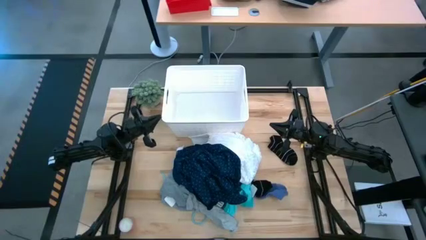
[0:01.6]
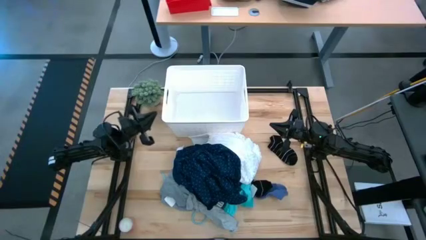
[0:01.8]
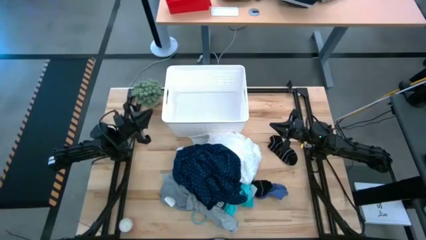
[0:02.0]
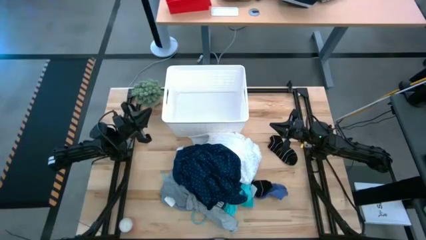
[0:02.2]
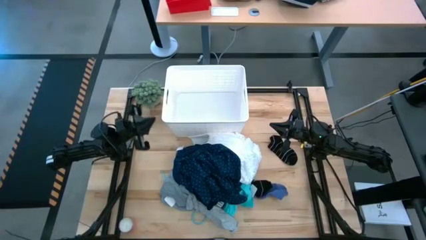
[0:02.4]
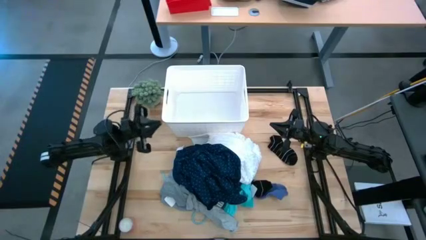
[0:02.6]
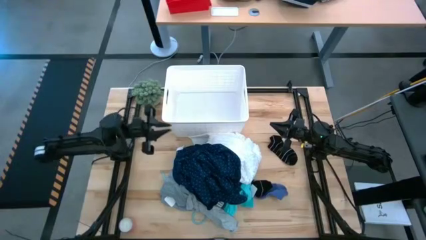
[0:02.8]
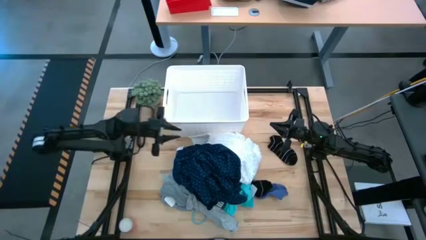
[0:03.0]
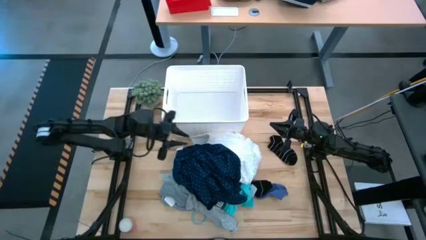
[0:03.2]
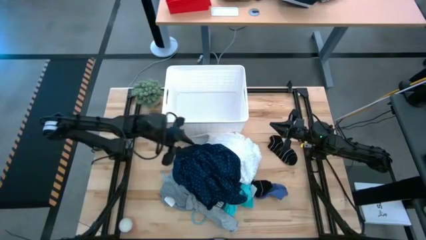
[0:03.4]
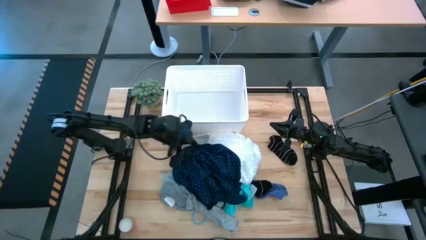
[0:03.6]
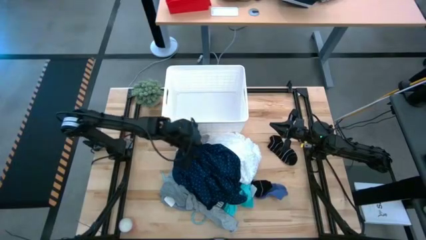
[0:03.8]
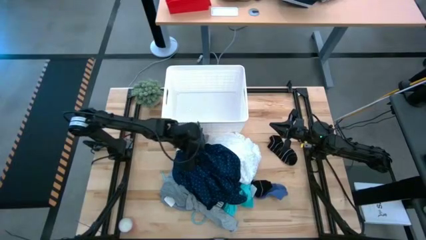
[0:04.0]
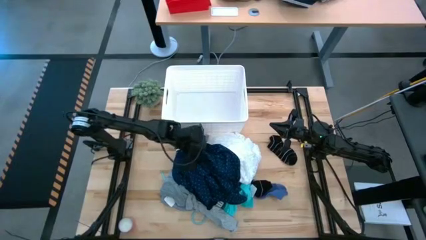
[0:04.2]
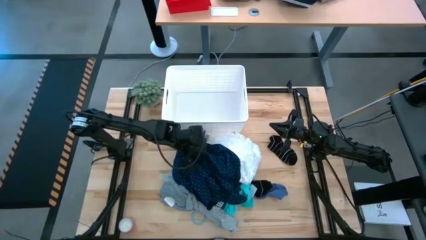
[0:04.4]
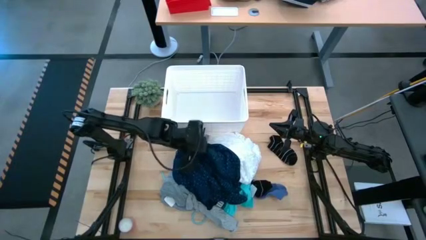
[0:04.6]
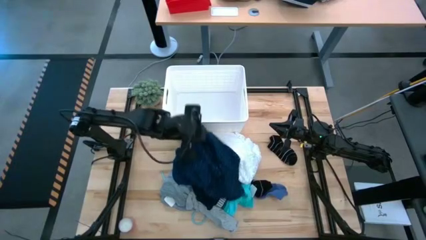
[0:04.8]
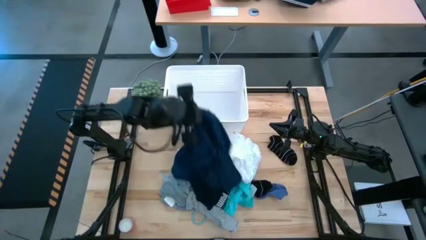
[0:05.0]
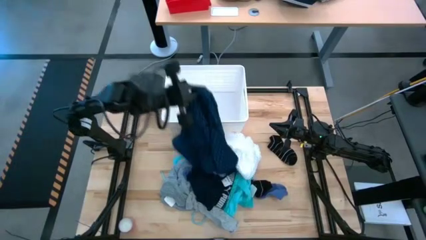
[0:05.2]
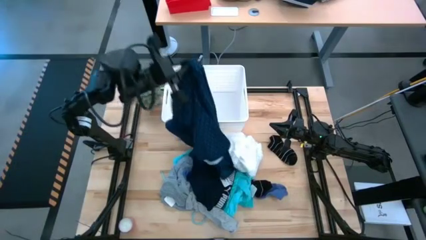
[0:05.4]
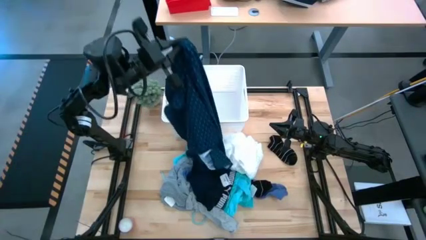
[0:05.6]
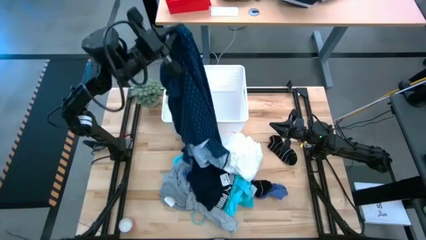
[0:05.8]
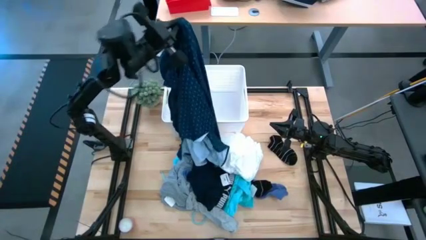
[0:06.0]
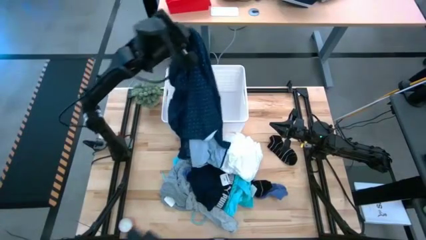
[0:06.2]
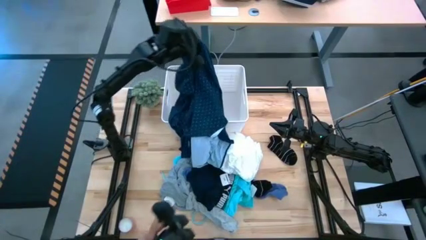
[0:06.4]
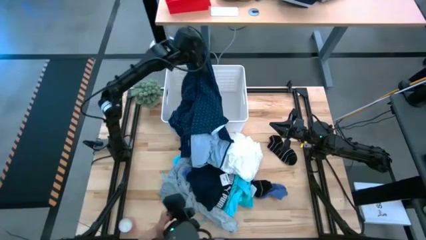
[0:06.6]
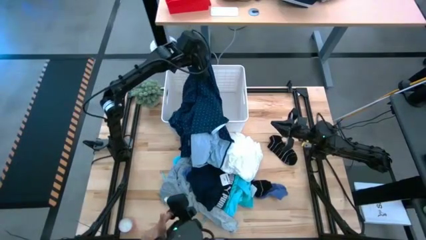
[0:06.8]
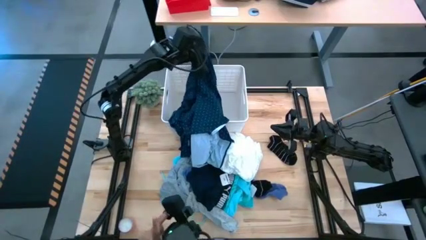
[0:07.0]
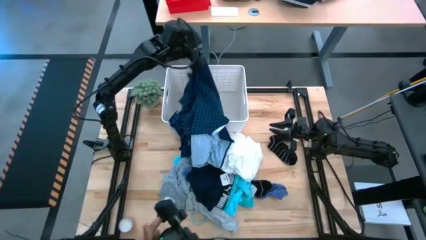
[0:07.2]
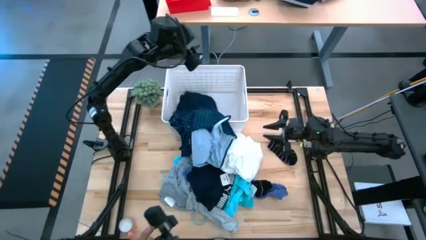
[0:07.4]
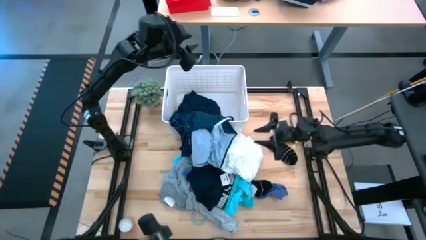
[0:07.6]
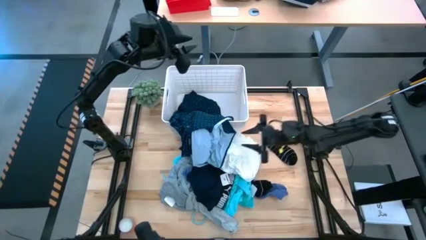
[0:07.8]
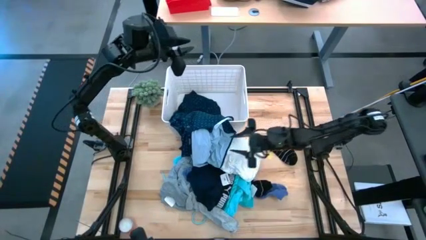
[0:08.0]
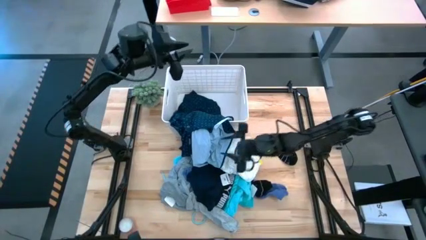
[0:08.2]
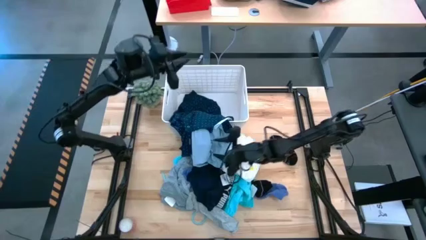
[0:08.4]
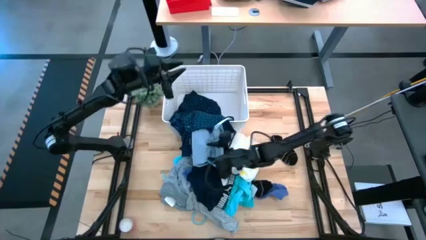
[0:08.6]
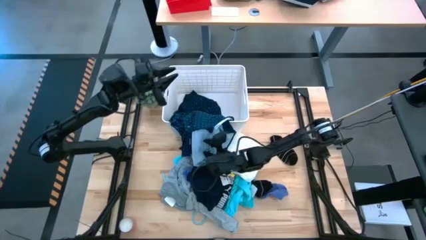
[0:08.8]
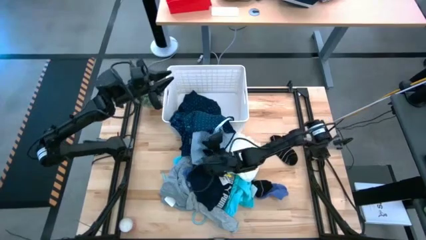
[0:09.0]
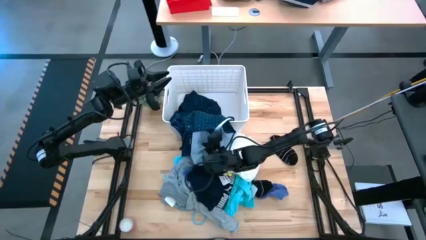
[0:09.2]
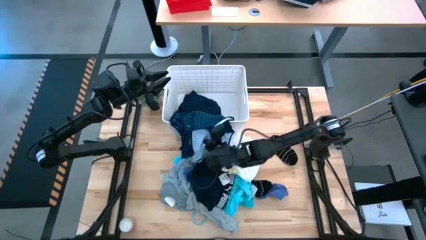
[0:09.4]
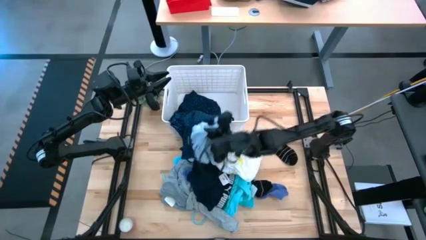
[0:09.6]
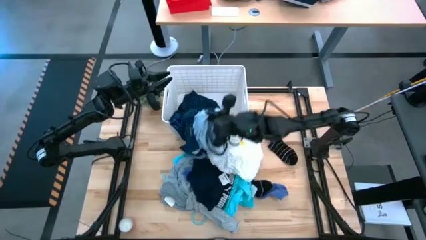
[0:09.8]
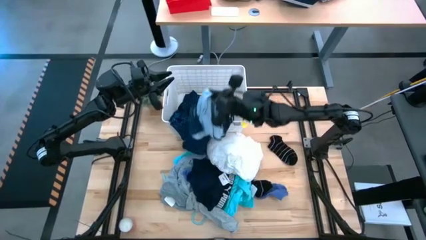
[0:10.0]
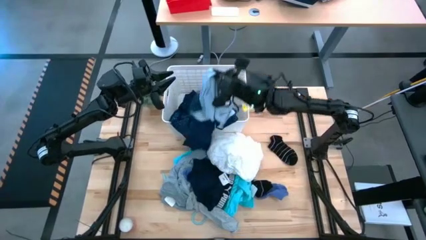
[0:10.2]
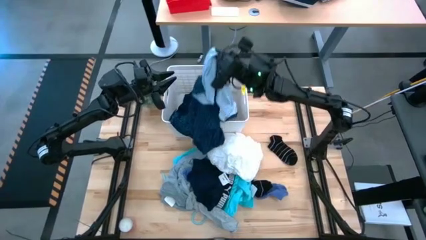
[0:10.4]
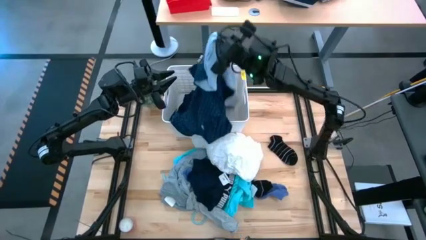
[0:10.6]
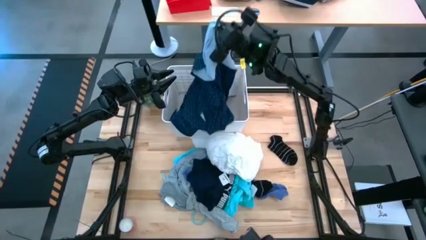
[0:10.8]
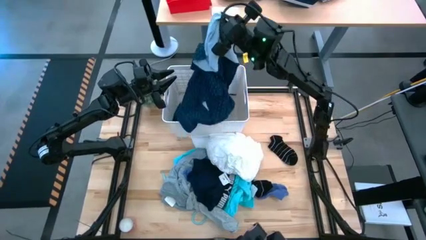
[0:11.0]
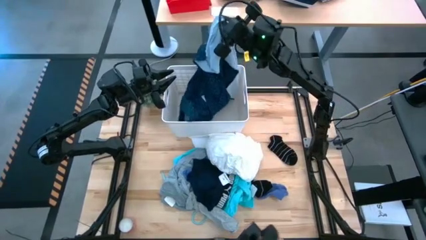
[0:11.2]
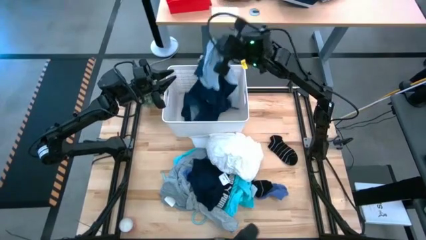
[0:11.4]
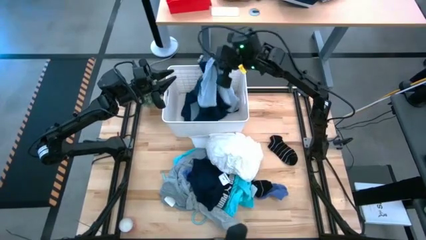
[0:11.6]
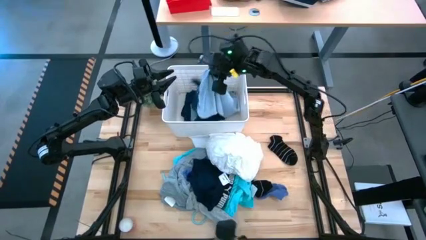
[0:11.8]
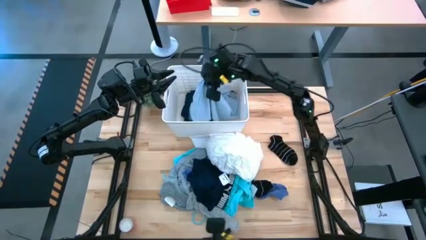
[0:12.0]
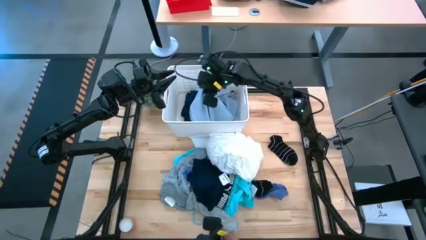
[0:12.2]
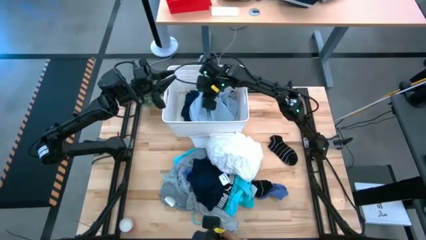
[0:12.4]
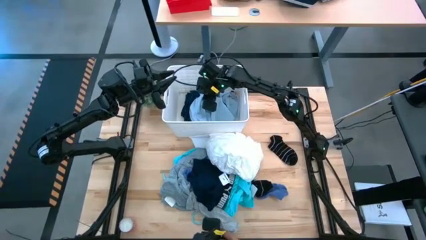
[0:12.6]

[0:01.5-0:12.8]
Task: Sort clothes
Put the blue shirt into the white bin

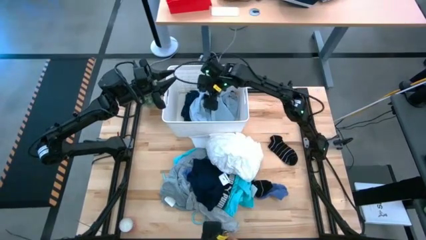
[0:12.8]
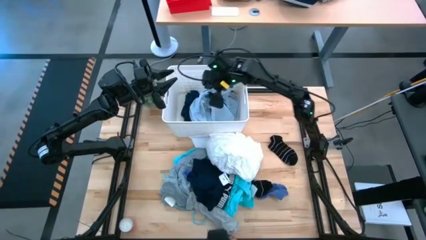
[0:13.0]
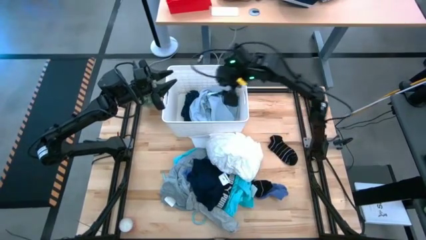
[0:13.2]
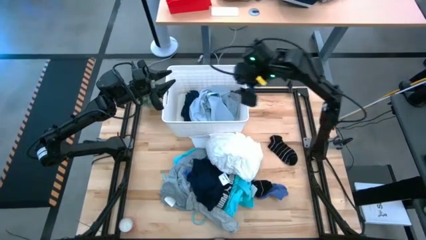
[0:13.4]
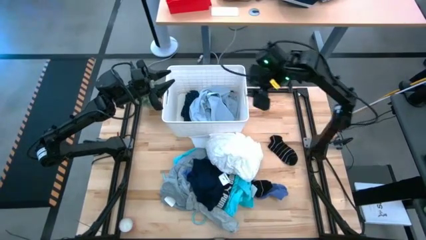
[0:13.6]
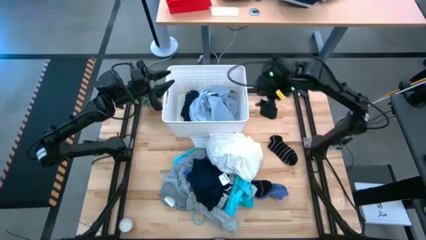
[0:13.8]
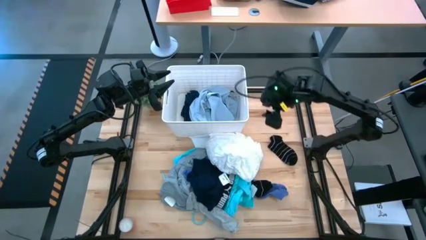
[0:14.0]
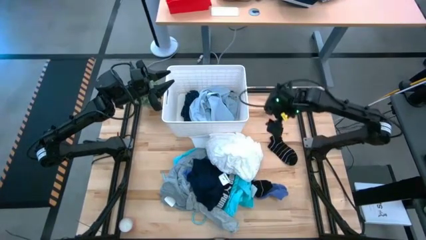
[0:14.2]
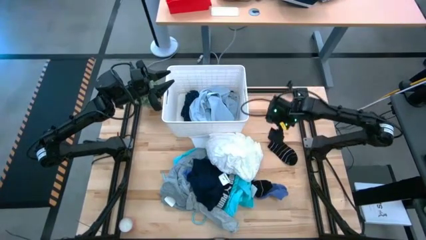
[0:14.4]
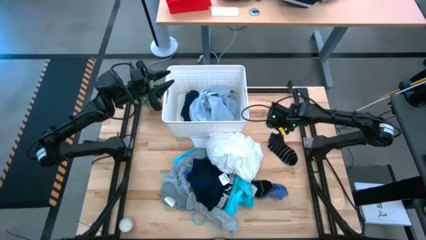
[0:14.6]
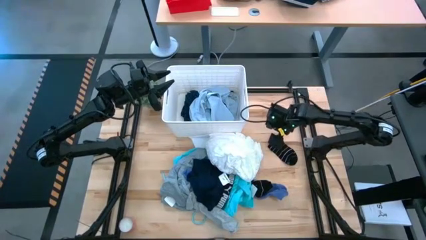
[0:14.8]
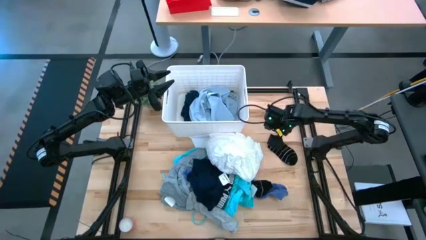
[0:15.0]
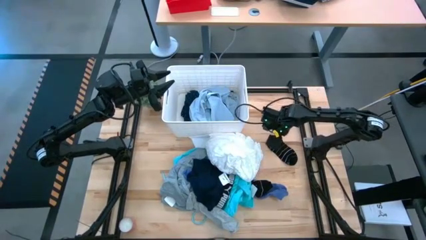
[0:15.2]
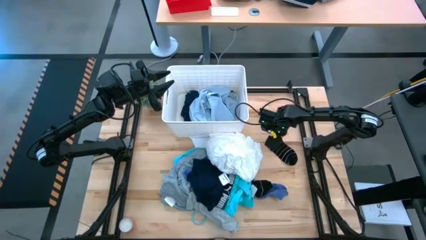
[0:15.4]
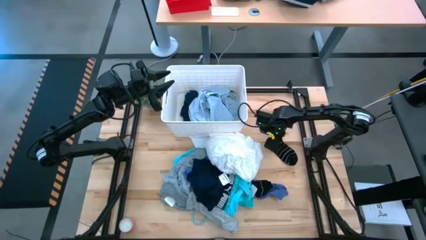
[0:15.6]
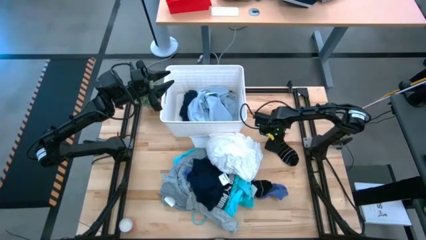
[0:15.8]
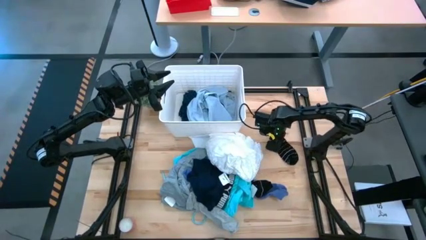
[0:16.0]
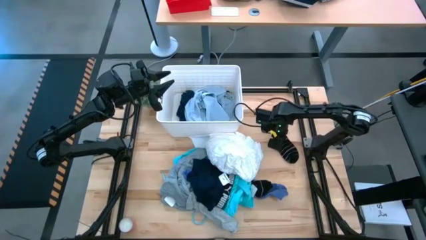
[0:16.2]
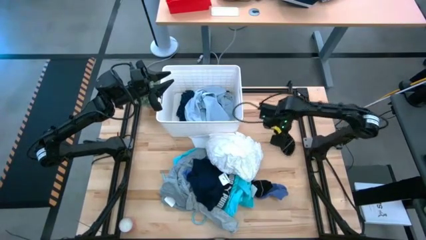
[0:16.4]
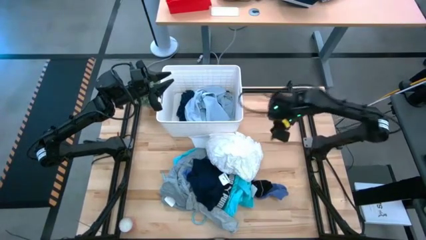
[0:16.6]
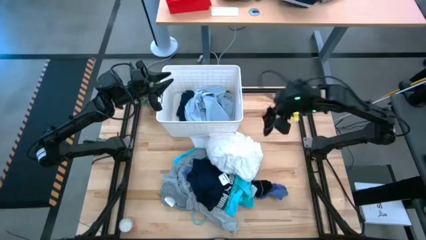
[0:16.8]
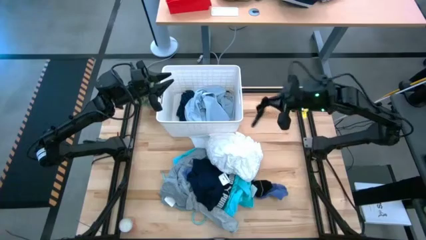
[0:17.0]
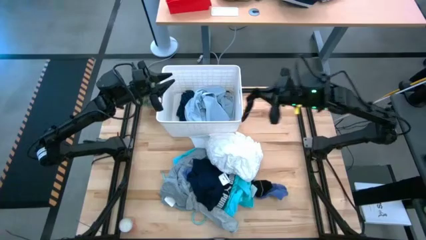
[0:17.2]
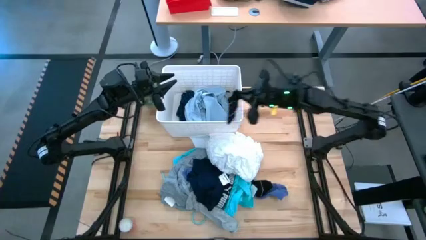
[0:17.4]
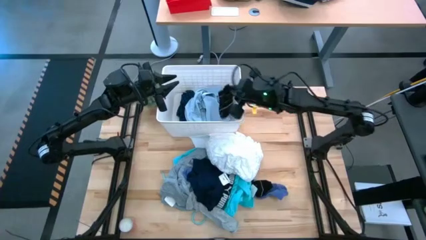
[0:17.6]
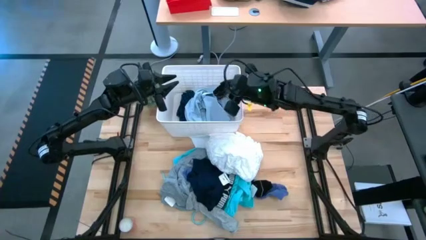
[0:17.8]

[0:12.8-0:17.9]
Put the top black sock into the white bin
